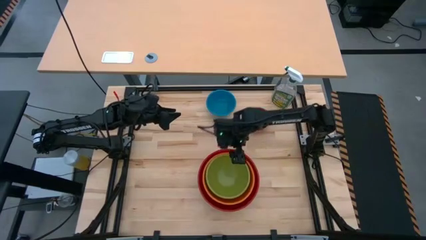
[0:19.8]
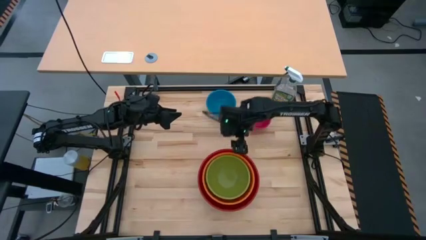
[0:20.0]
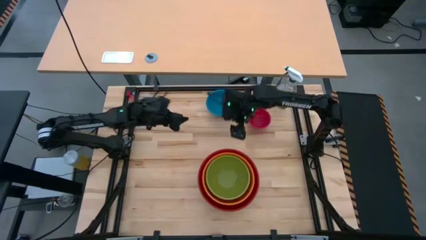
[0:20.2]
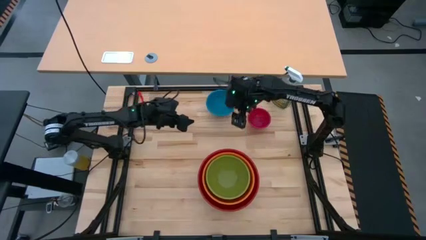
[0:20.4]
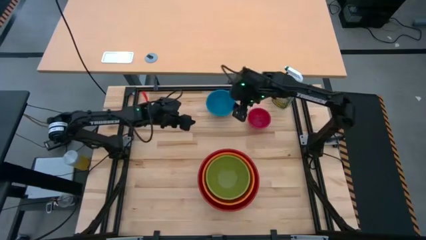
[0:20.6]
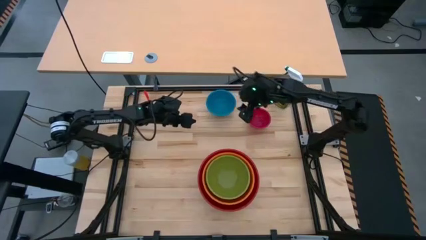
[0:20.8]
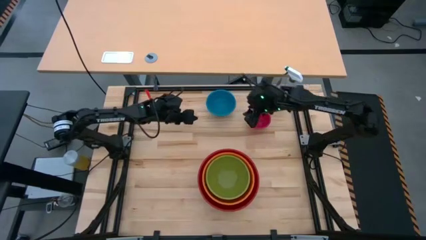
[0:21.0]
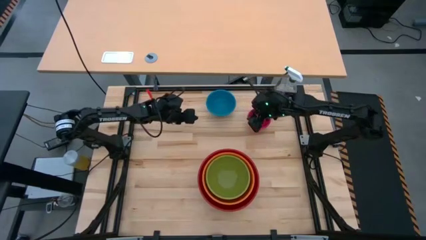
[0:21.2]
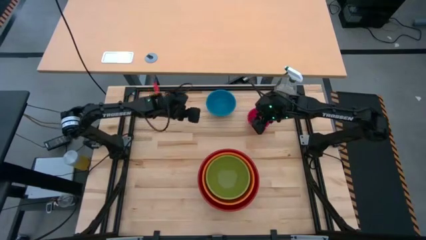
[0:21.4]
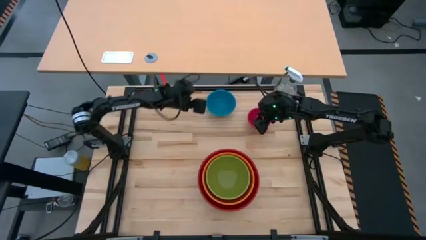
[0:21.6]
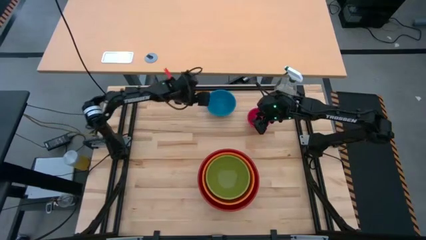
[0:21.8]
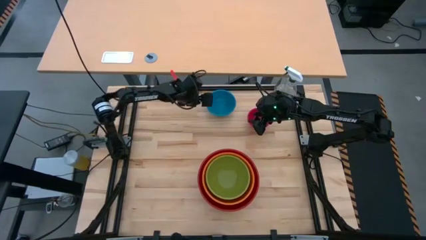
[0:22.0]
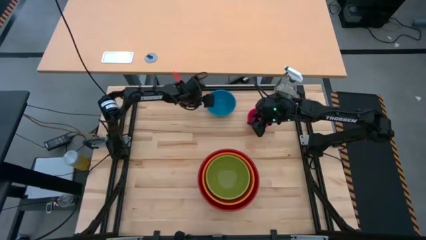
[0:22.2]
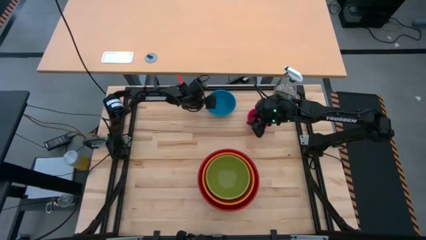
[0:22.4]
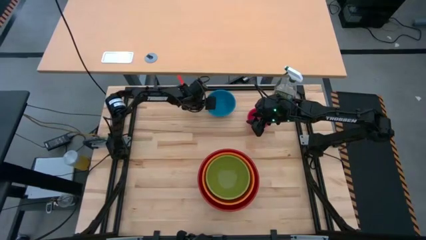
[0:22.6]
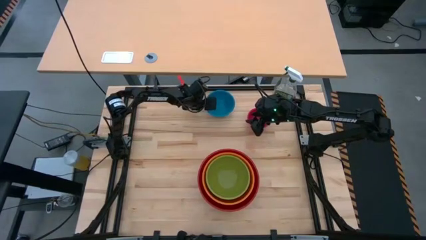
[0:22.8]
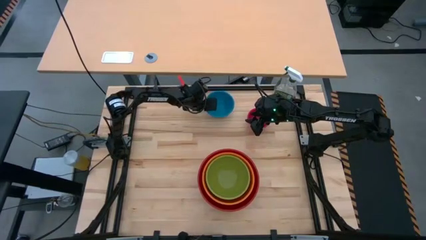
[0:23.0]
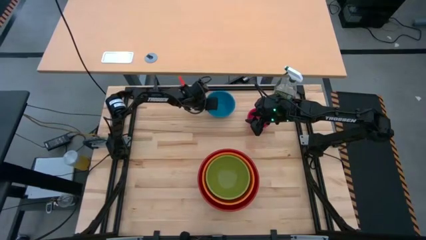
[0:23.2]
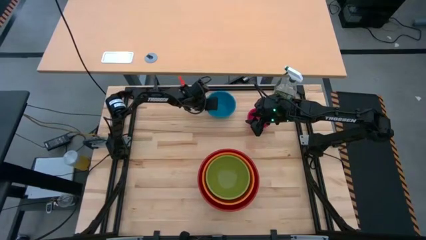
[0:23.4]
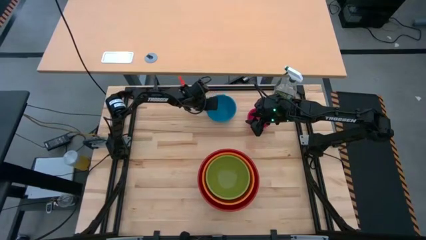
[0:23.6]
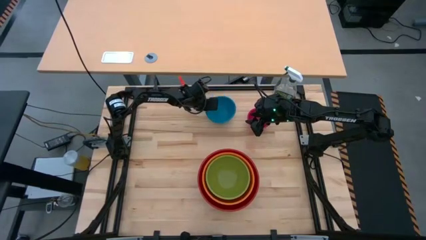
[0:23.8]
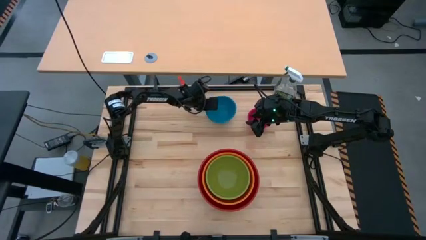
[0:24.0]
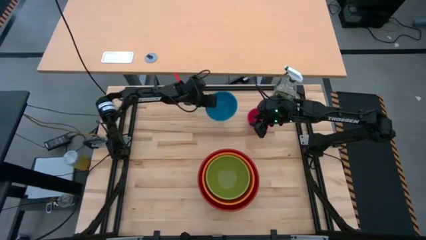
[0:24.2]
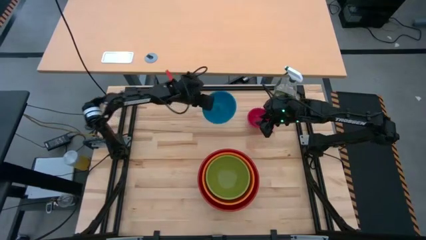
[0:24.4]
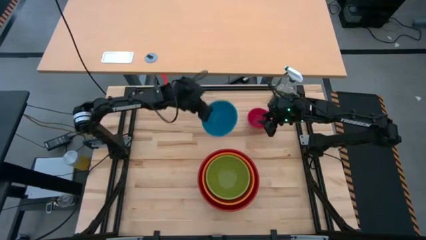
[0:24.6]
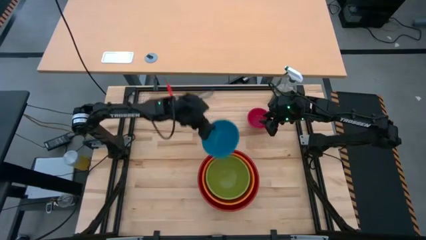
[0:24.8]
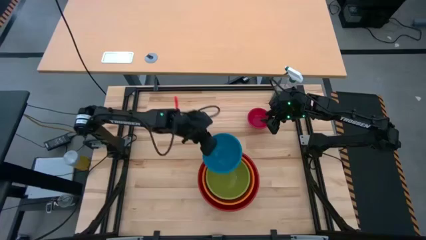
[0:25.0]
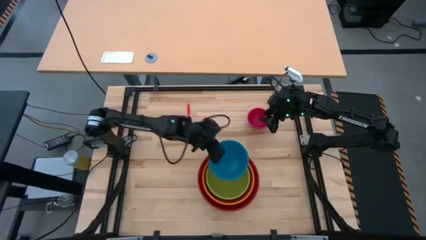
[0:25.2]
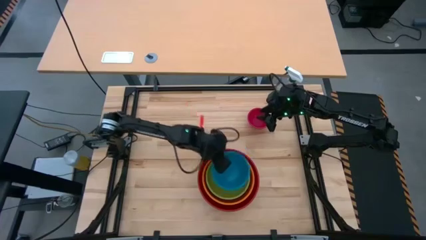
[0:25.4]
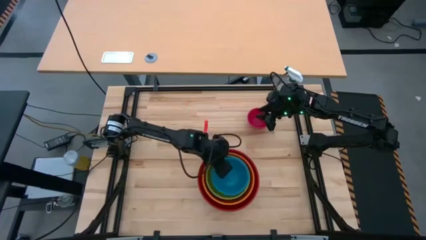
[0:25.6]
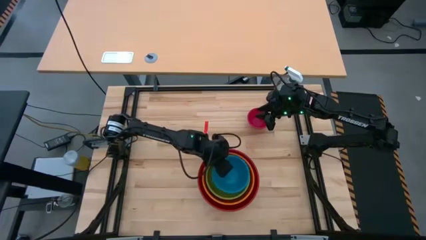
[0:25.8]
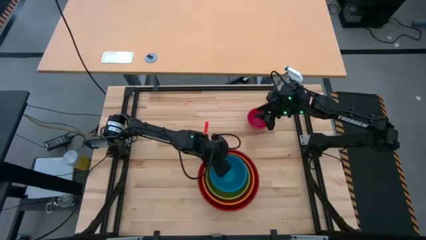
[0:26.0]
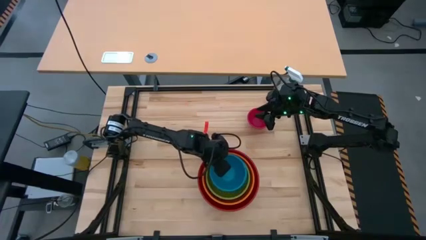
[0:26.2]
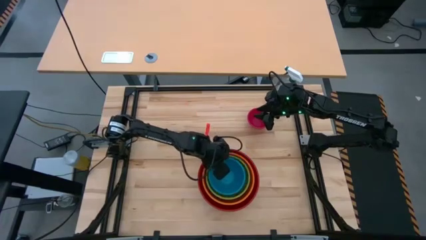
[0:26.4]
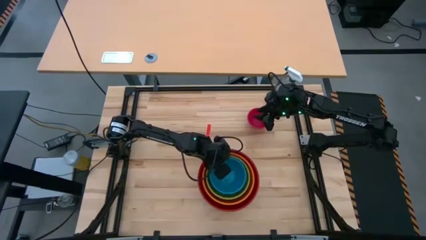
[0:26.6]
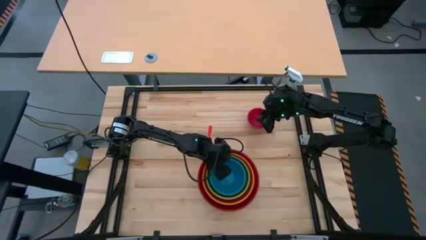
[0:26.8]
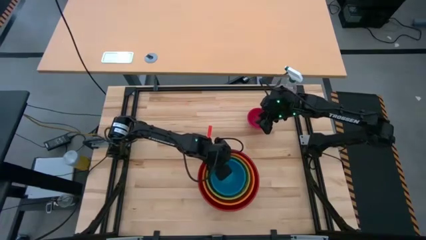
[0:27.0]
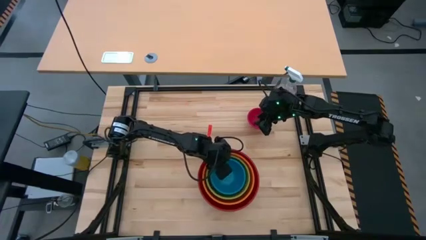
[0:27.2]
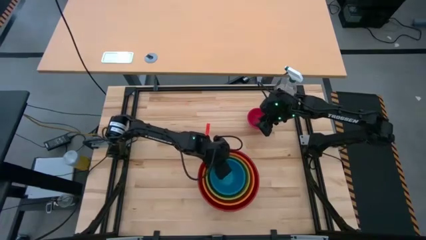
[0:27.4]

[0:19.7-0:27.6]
Stack the blue bowl on the green bowl

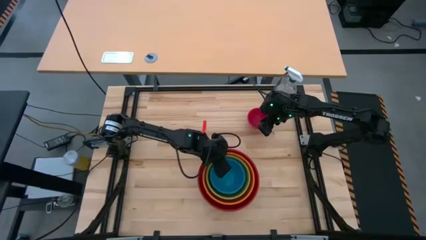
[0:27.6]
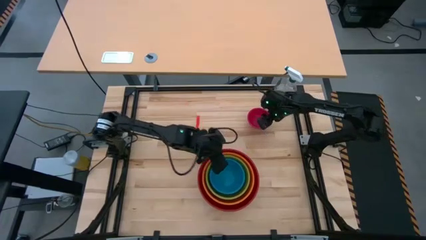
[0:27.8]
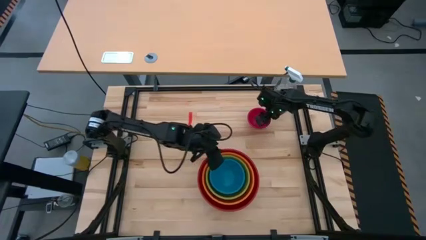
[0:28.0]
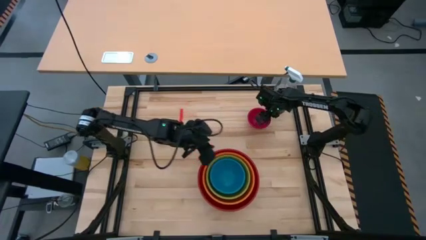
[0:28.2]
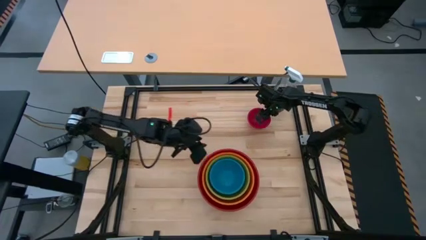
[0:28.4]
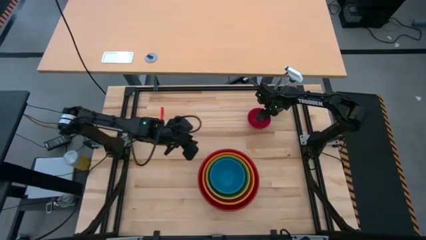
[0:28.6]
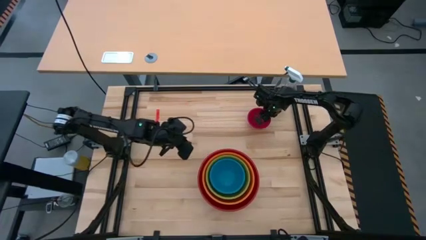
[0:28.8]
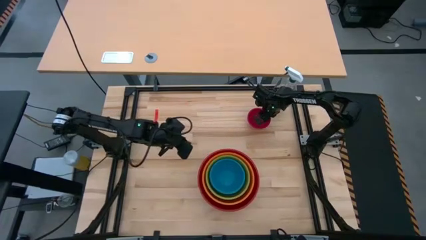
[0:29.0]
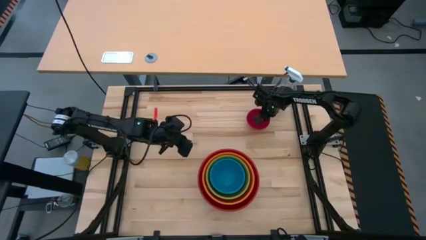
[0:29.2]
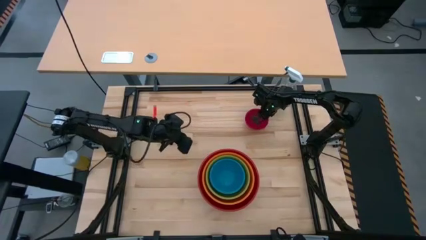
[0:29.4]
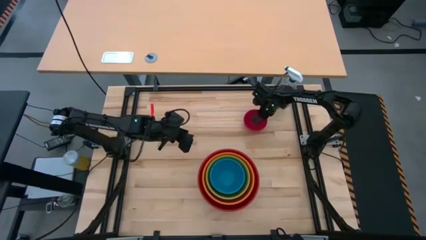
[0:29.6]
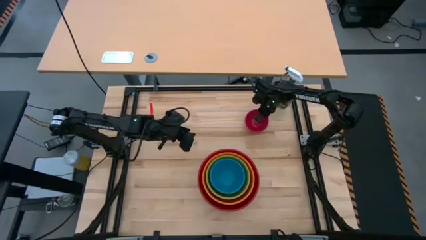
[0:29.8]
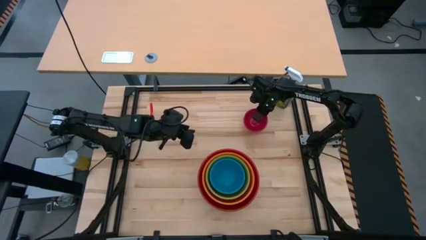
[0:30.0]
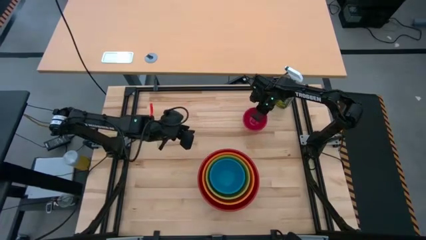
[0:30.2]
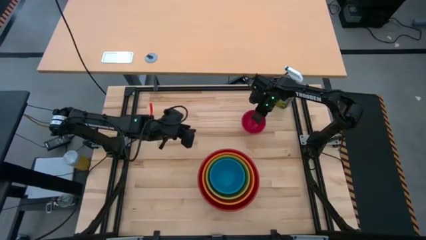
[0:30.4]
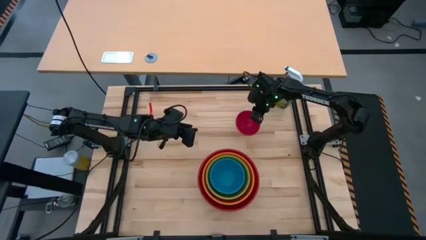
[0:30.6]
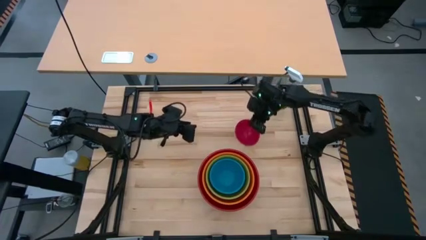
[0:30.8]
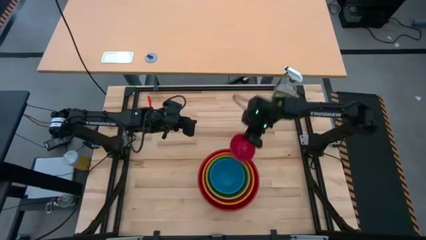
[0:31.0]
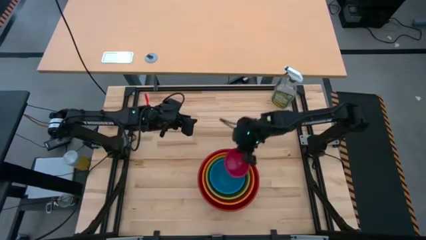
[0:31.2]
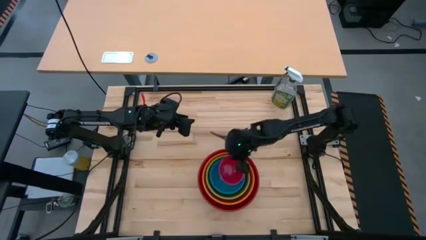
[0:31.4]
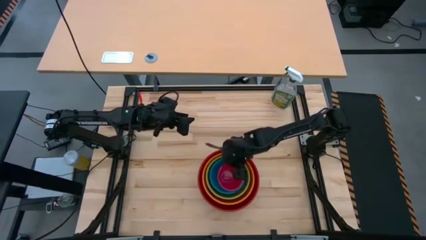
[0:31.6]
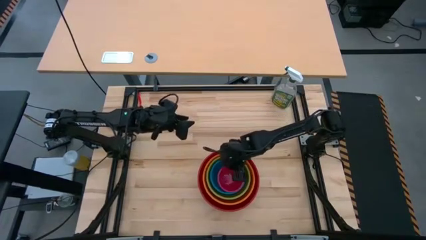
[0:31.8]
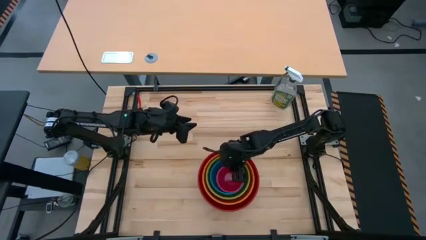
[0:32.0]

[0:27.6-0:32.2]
Stack the pink bowl on the blue bowl

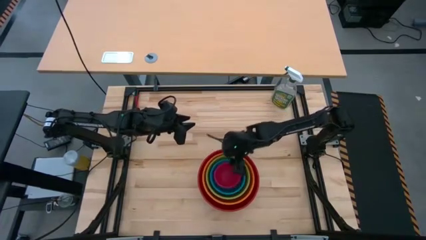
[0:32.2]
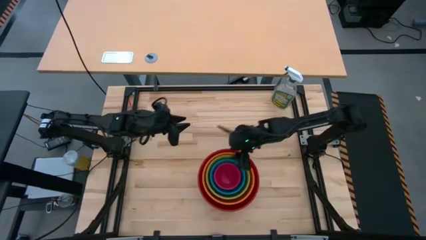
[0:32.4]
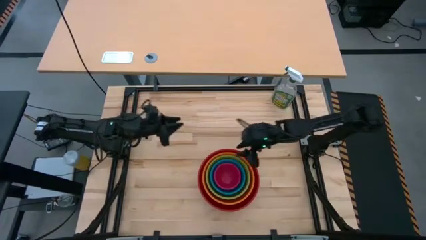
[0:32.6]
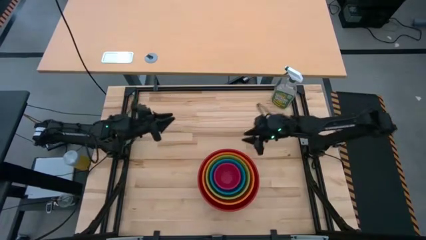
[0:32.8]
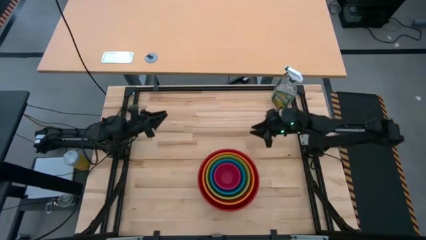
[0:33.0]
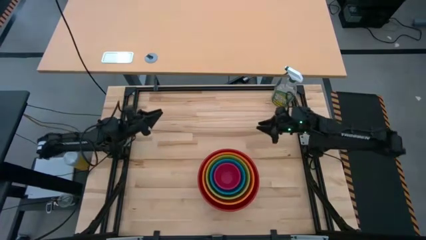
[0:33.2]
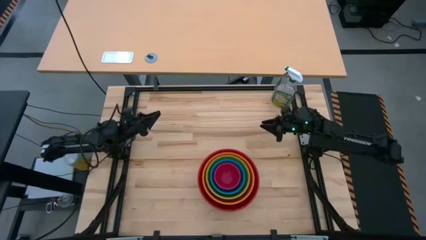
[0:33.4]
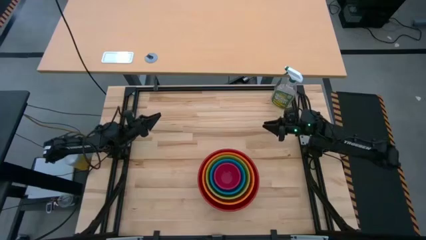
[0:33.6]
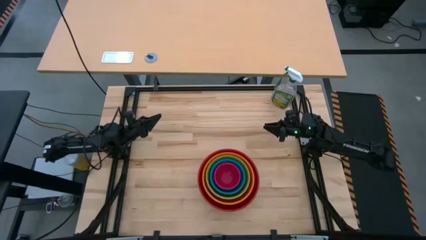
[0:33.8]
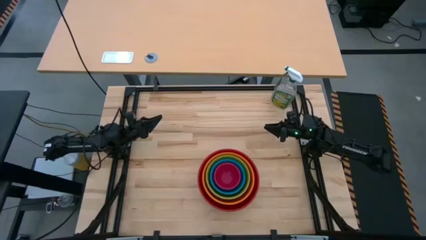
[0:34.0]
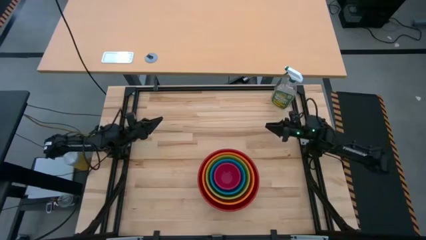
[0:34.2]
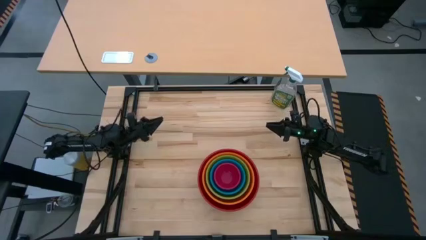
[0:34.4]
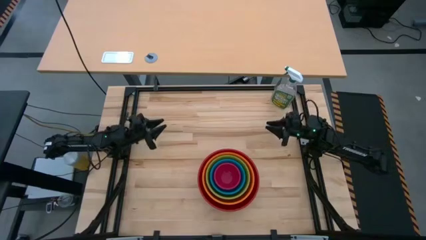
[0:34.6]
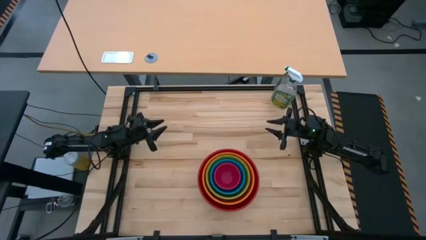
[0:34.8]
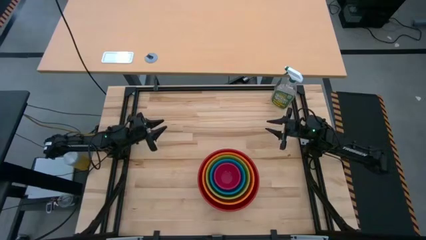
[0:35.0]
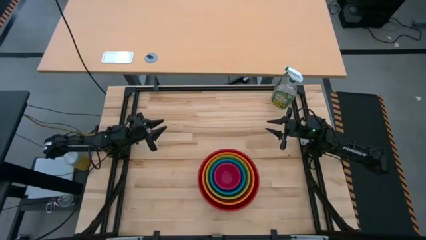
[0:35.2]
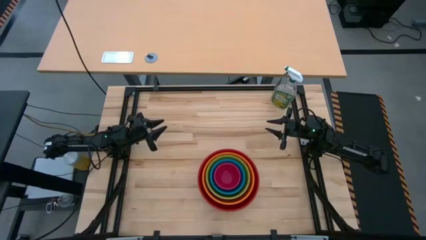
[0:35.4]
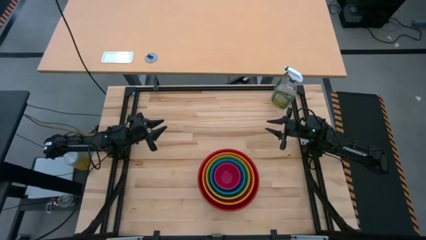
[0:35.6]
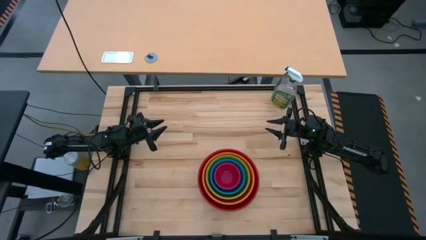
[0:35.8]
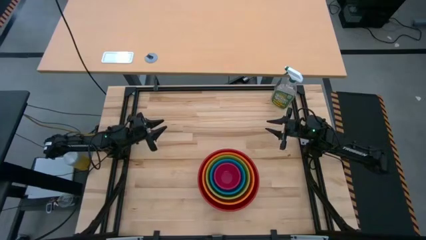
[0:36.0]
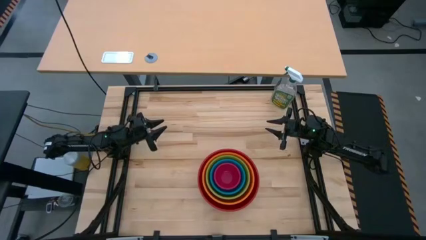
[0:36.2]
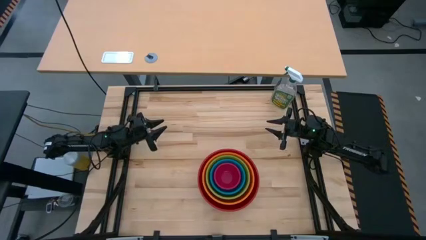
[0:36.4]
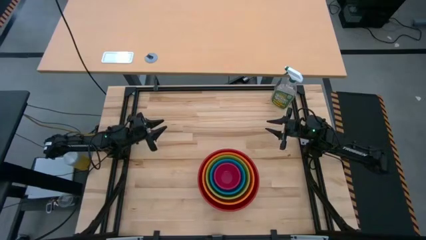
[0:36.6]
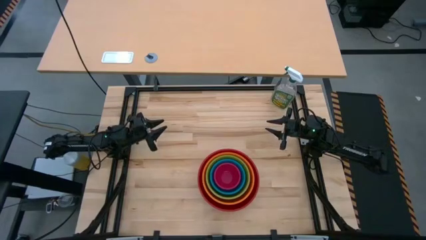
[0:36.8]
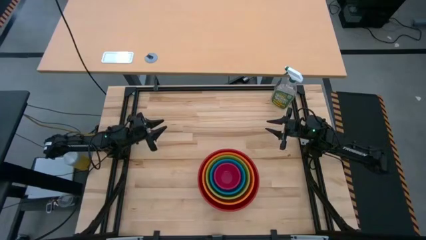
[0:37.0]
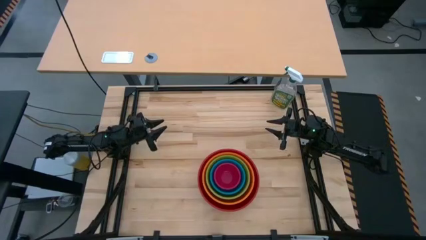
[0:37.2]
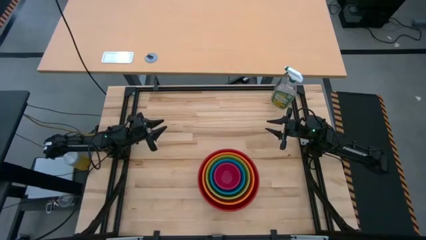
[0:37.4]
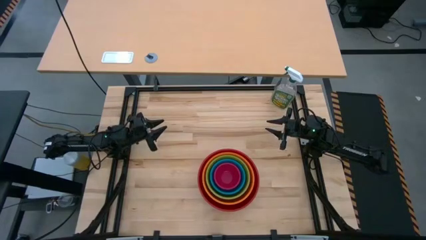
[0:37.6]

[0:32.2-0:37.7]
Return to Home Position
